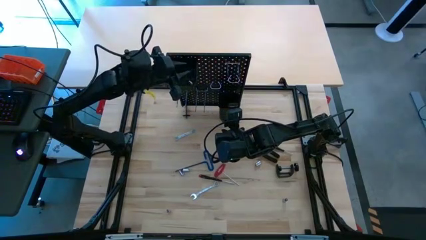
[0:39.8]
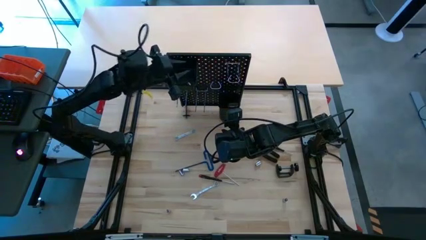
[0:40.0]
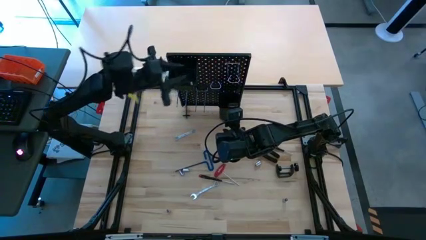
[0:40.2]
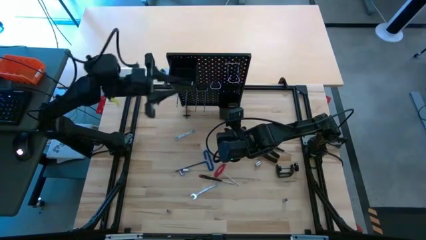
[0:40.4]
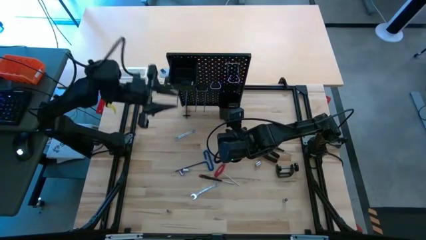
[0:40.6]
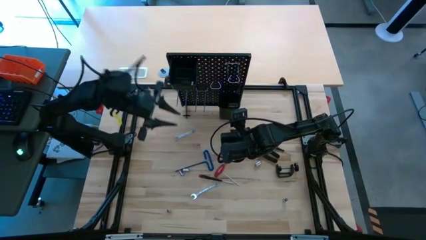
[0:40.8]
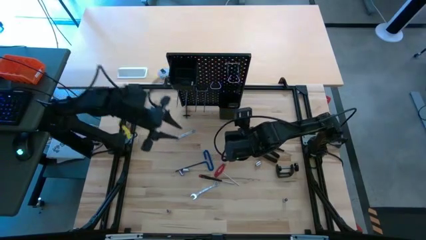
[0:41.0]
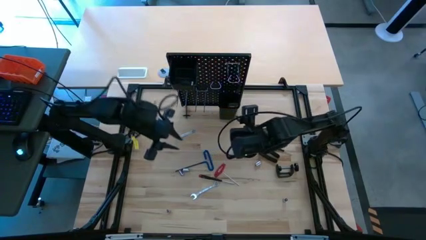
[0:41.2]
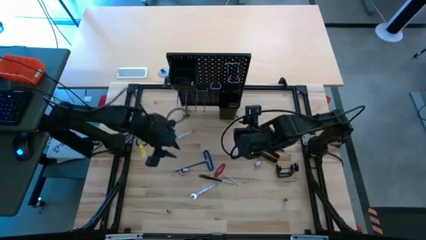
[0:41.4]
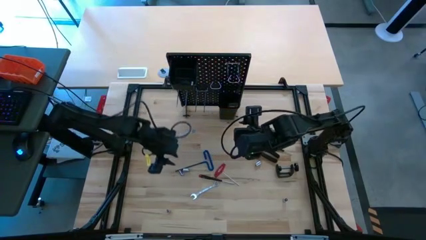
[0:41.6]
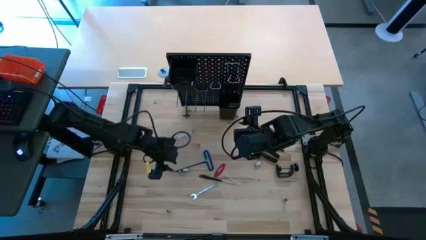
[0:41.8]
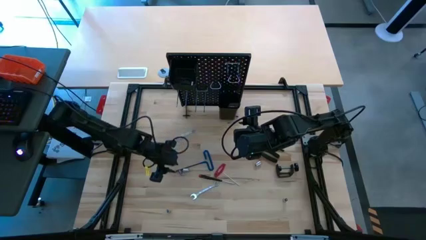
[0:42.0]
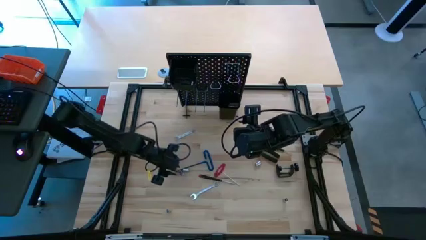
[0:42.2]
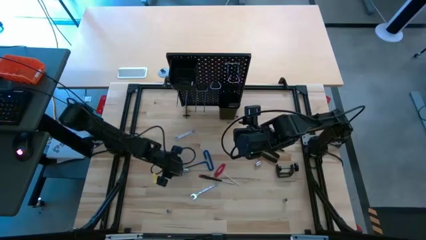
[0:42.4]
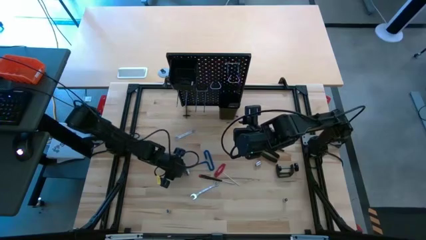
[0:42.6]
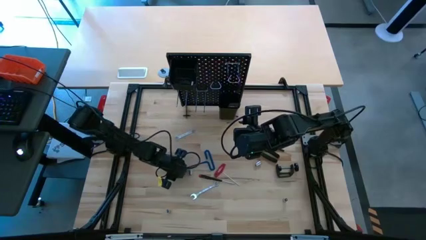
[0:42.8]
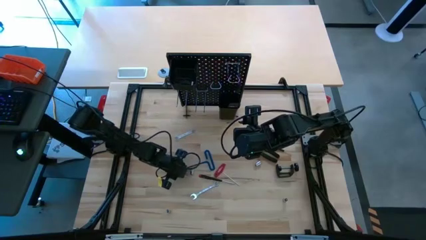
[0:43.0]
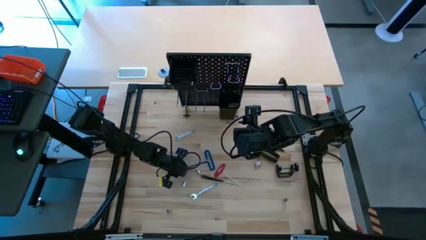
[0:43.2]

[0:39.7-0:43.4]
Task: Hang tools onto peg board
Put the socket into the top black bin on the pegboard

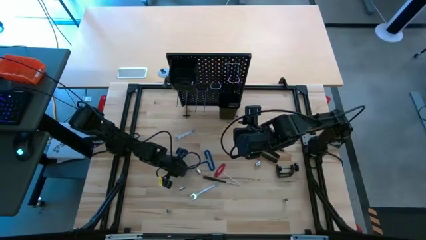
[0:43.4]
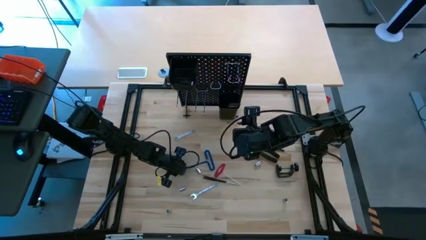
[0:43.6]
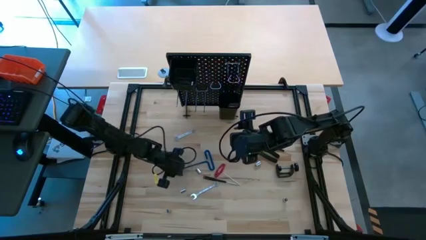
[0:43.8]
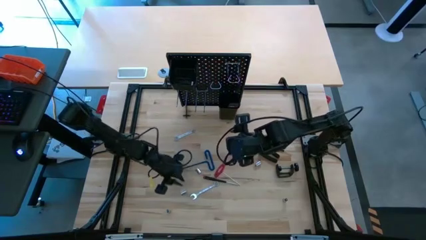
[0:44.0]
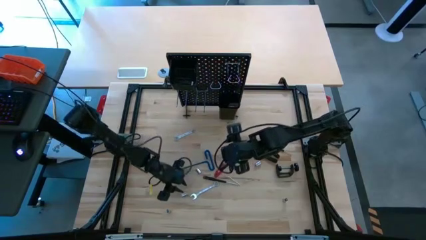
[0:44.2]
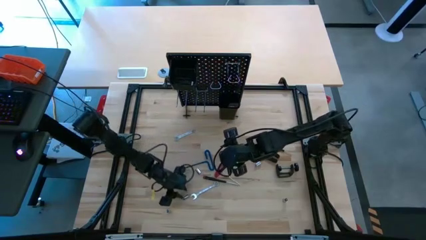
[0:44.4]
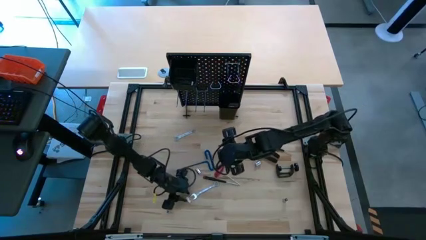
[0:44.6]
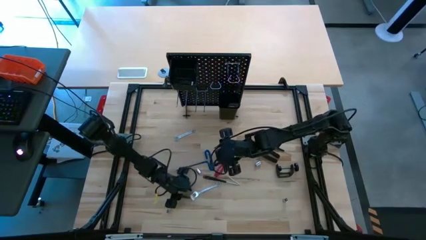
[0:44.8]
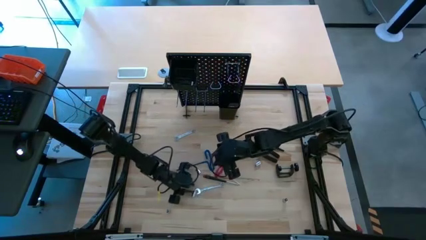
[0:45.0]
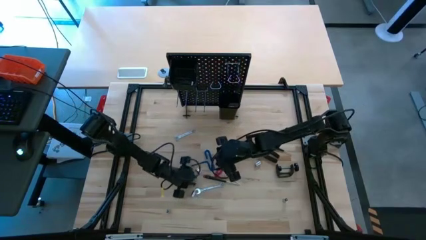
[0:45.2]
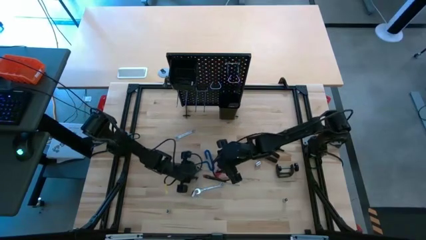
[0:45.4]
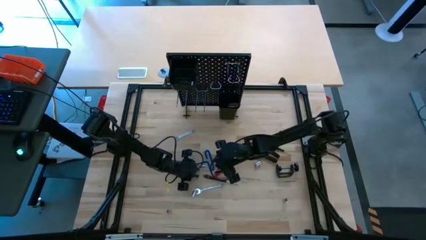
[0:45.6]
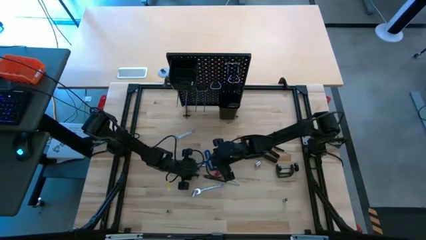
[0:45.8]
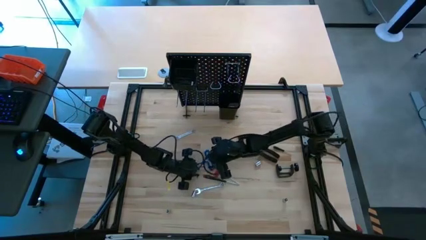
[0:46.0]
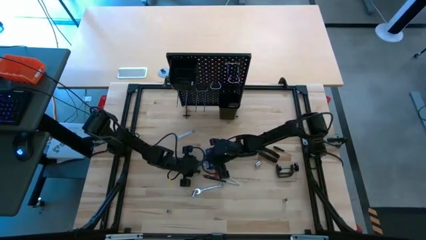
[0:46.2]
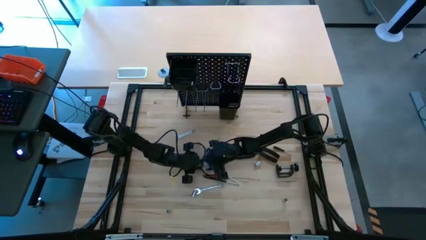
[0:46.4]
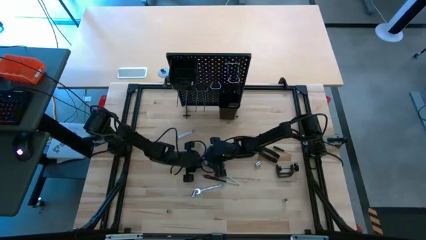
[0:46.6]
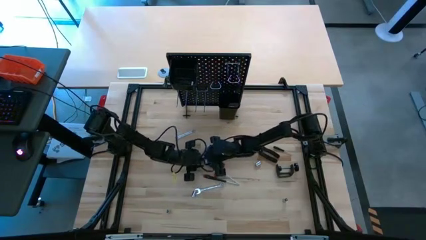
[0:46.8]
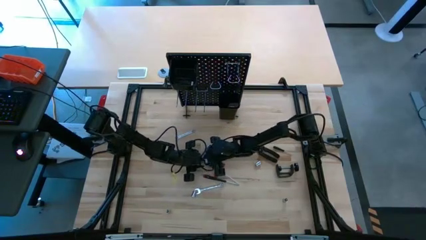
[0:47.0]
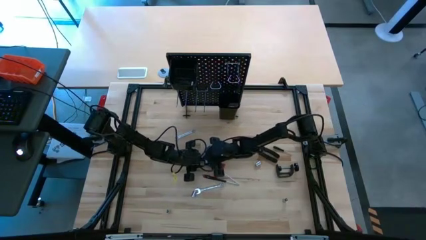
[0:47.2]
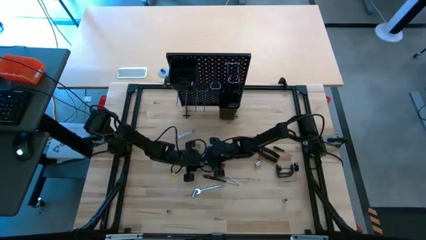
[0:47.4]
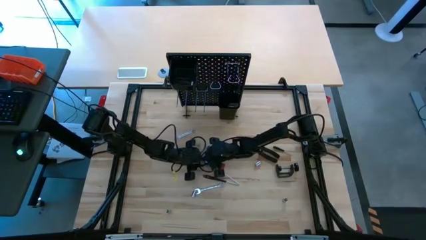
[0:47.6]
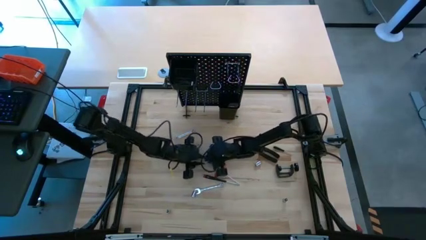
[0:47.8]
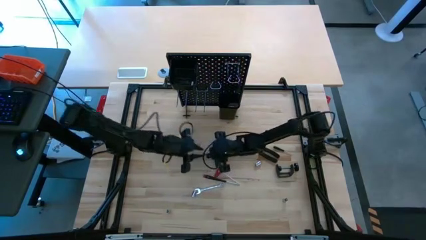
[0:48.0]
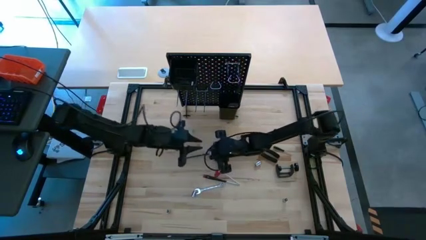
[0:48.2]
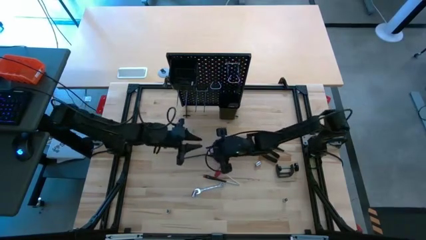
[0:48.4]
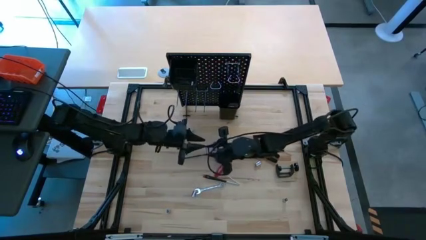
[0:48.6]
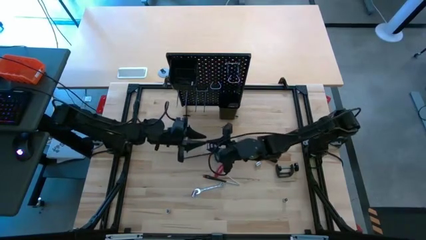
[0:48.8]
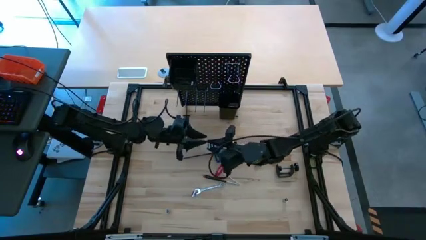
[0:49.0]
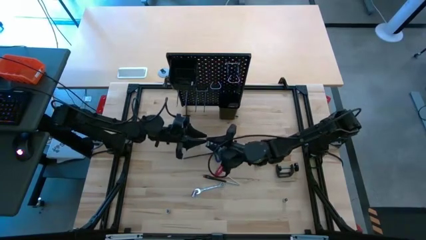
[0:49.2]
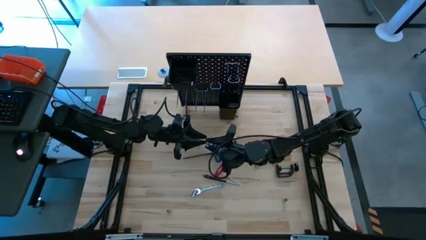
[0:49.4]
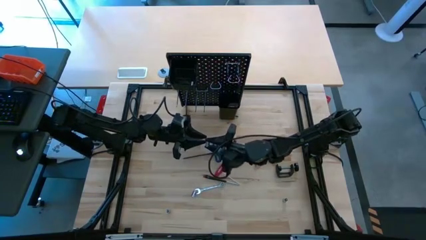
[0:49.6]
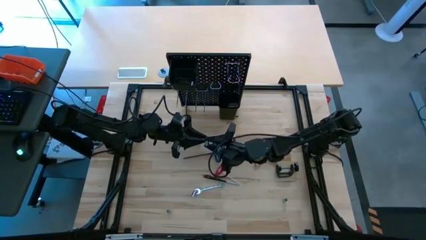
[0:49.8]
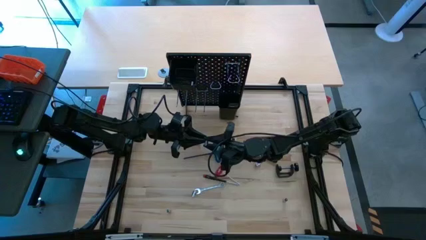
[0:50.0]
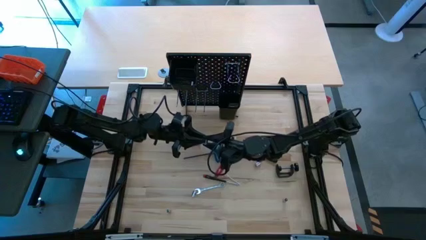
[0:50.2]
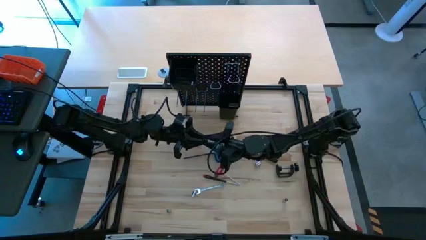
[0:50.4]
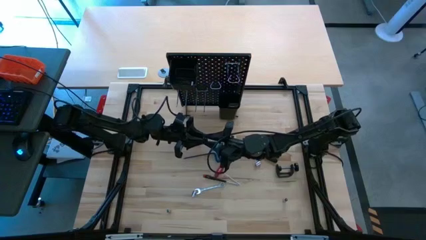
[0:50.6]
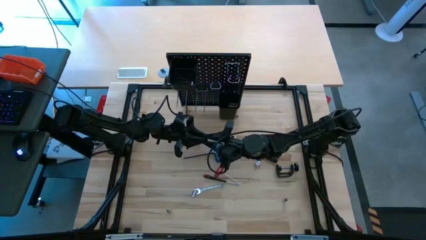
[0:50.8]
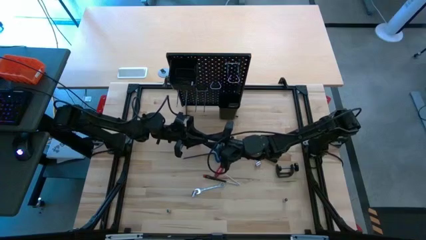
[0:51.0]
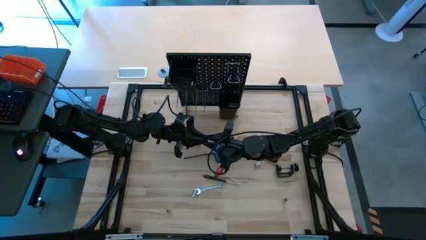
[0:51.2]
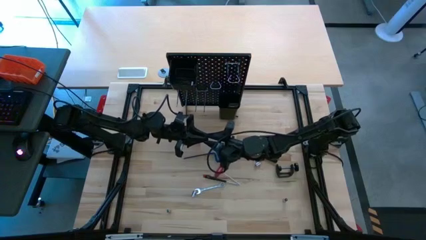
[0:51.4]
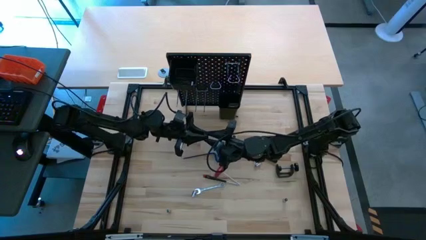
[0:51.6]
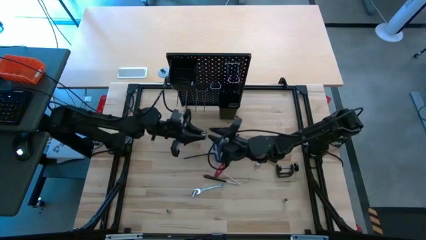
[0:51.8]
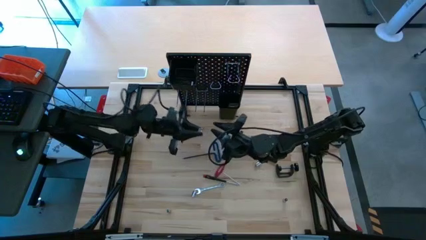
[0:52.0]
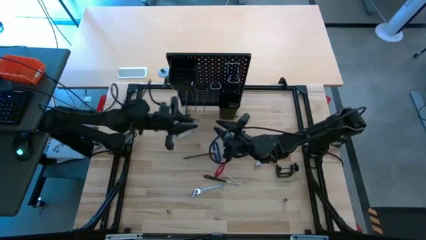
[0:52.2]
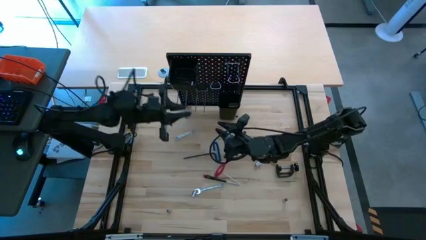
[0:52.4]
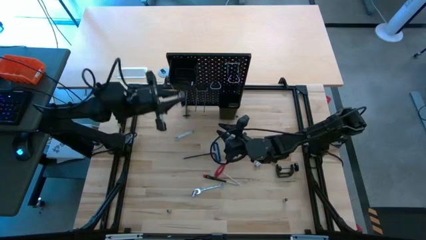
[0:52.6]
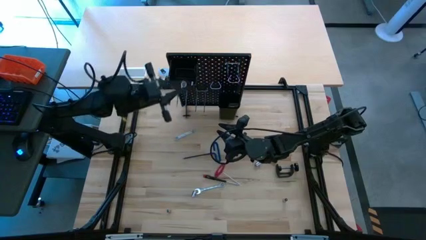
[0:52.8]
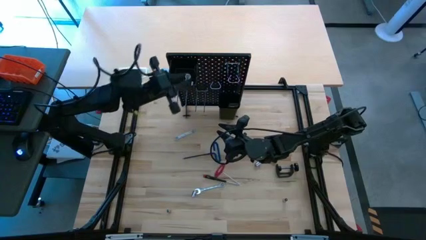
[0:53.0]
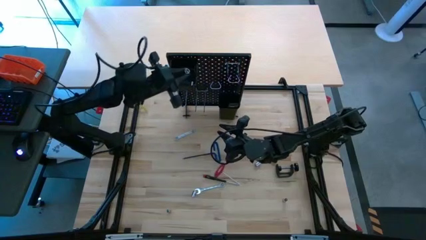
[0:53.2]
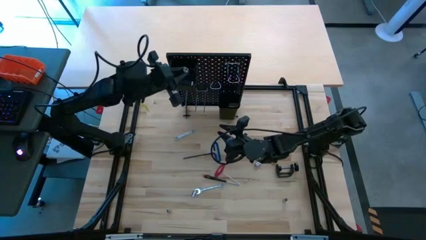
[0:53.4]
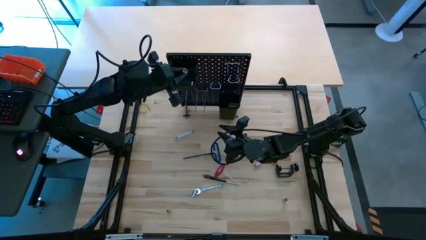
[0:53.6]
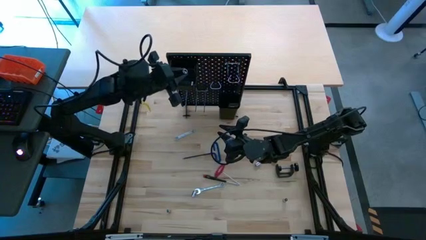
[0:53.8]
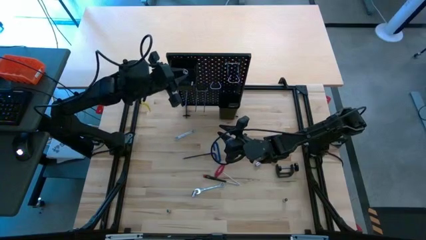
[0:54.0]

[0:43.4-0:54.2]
Put the socket into the top black bin on the pegboard

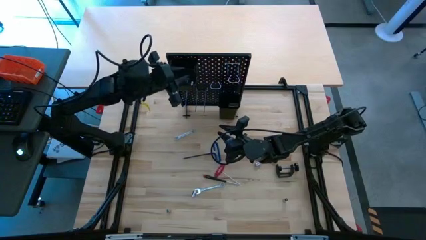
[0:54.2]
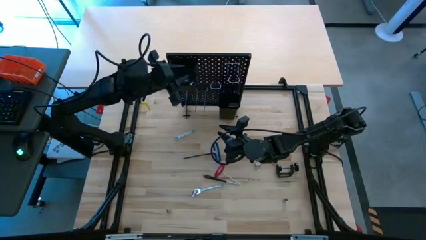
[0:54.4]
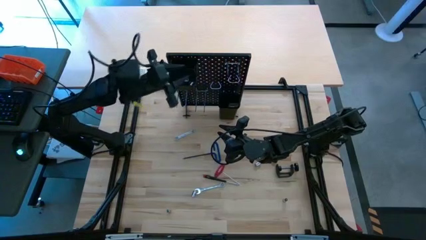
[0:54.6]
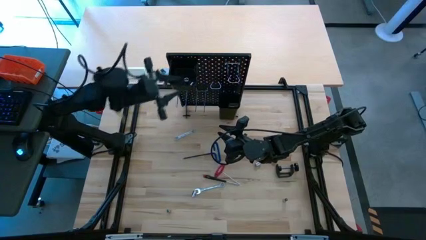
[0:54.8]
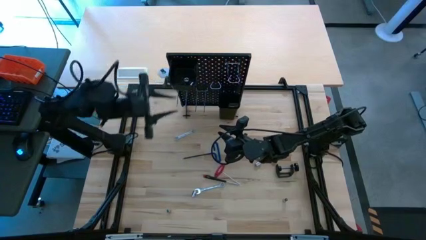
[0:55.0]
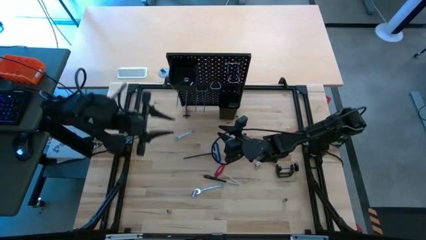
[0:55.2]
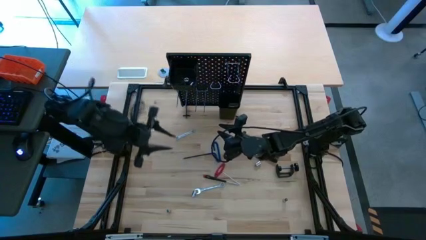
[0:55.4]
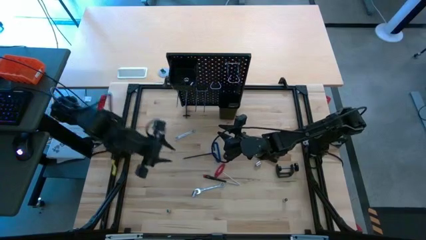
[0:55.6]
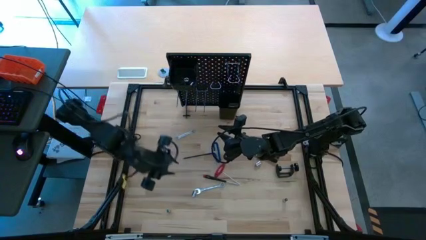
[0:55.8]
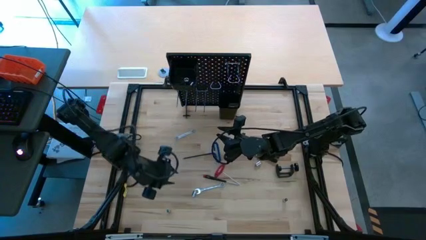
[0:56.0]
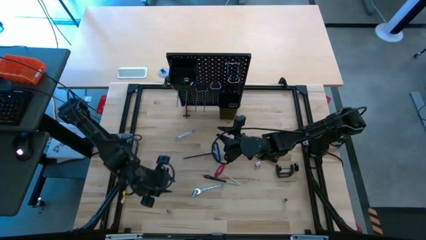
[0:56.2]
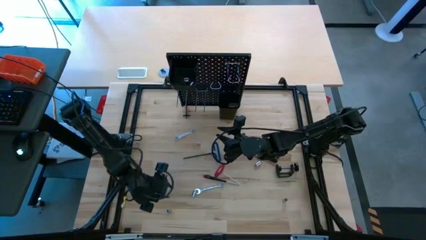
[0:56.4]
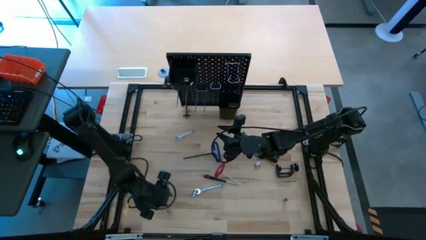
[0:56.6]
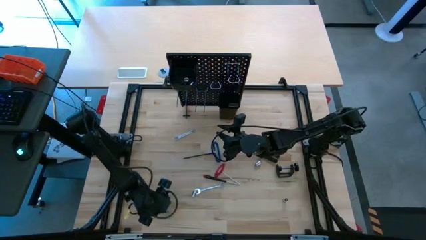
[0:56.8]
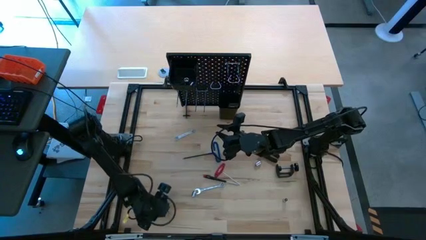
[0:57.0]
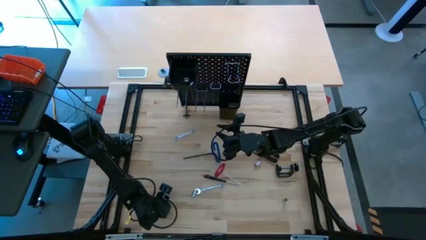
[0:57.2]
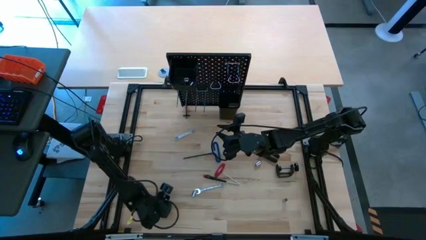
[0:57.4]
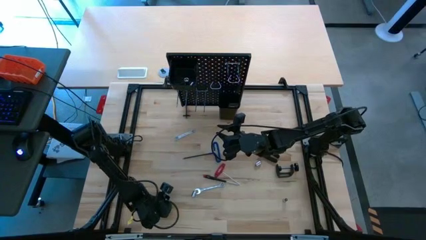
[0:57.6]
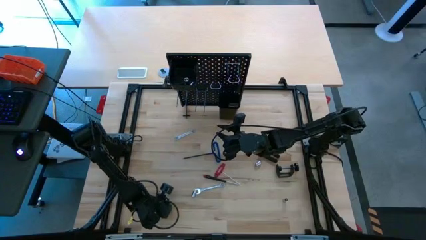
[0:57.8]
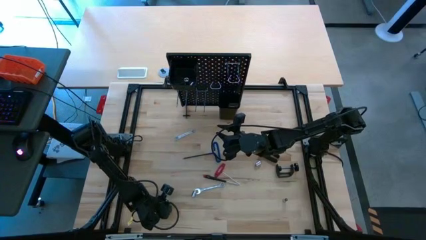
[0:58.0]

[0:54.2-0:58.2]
Put the socket into the top black bin on the pegboard
